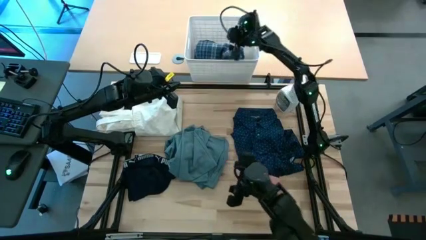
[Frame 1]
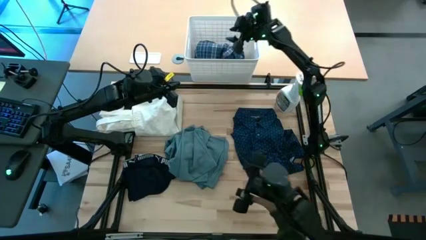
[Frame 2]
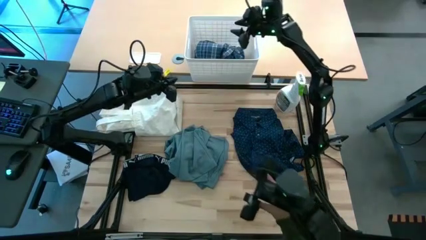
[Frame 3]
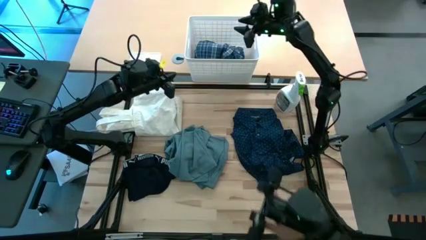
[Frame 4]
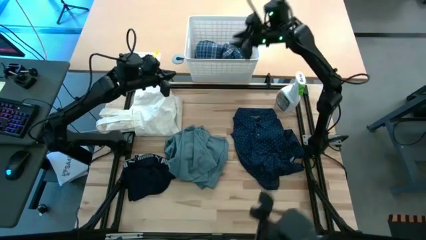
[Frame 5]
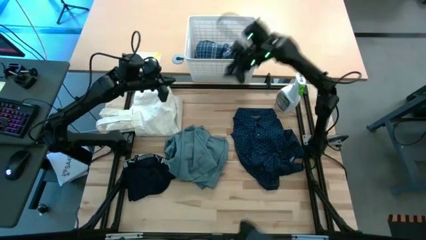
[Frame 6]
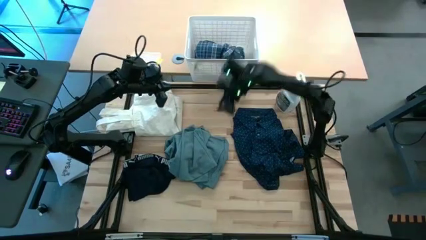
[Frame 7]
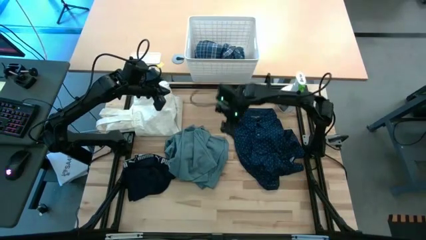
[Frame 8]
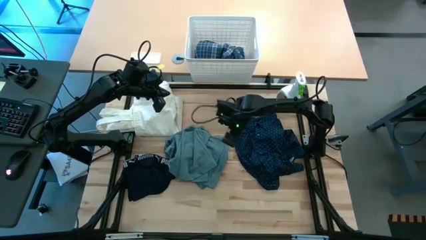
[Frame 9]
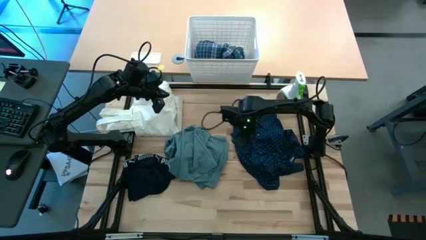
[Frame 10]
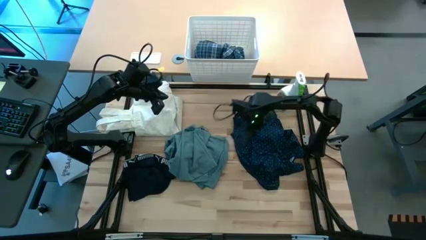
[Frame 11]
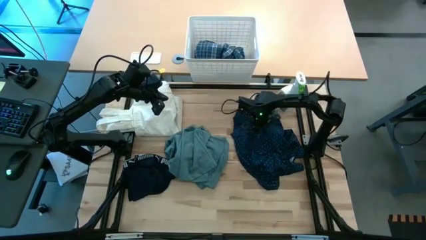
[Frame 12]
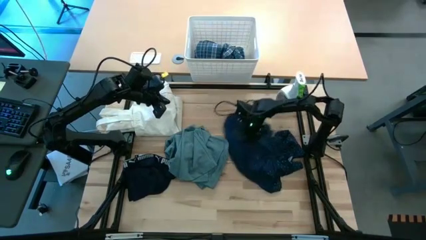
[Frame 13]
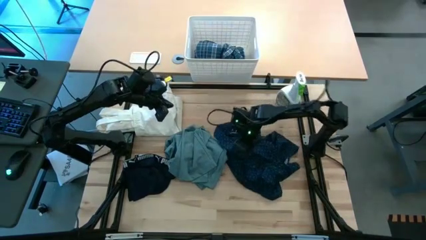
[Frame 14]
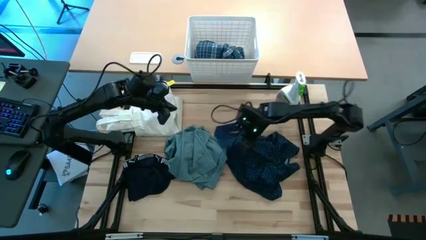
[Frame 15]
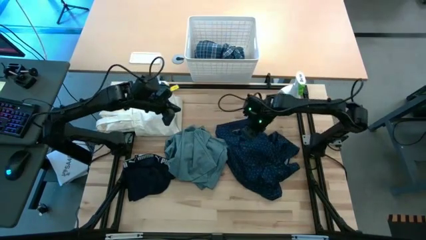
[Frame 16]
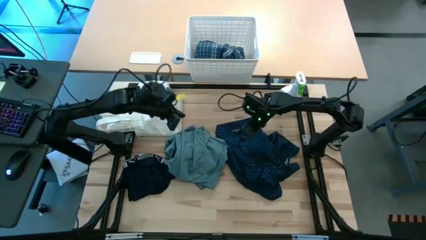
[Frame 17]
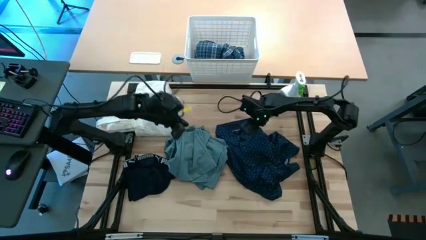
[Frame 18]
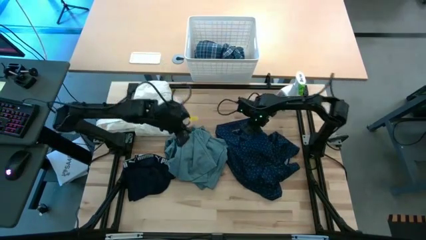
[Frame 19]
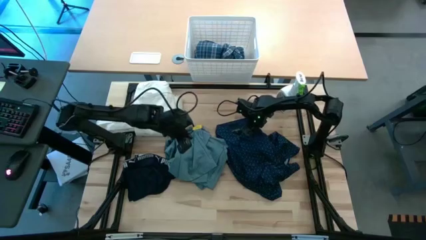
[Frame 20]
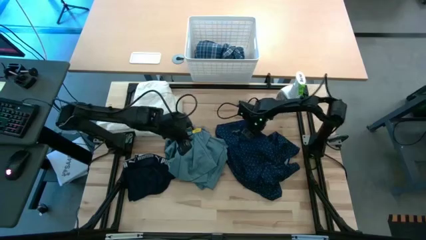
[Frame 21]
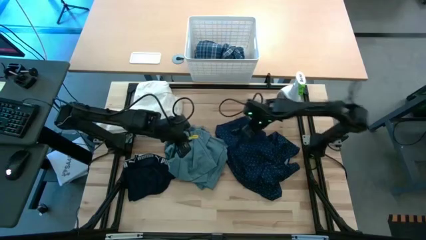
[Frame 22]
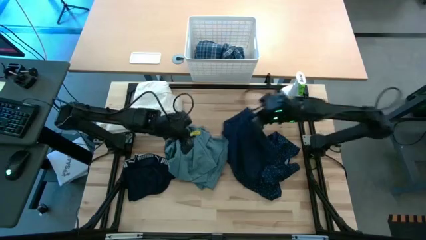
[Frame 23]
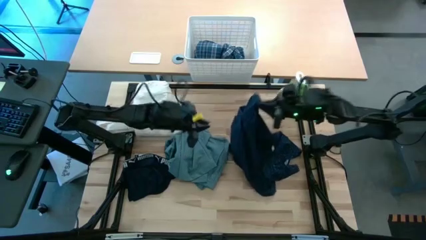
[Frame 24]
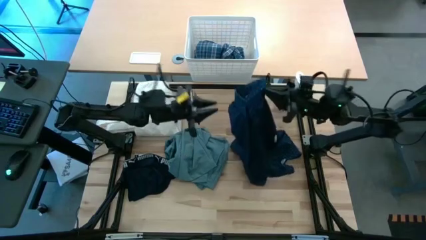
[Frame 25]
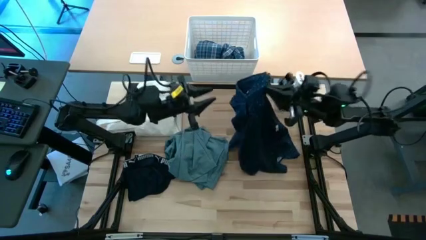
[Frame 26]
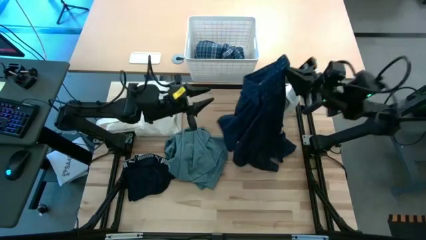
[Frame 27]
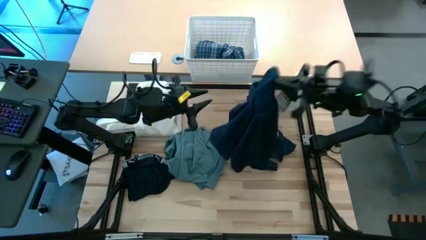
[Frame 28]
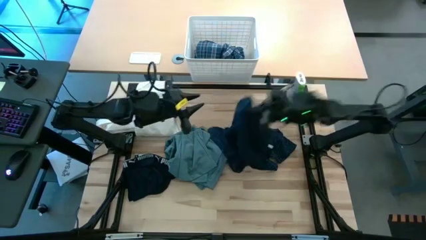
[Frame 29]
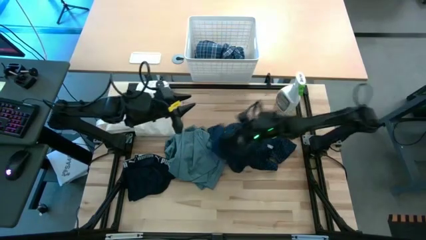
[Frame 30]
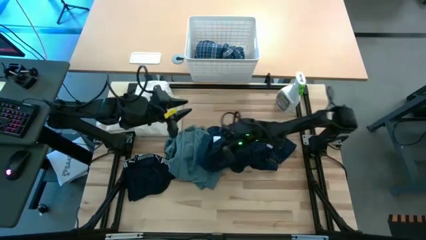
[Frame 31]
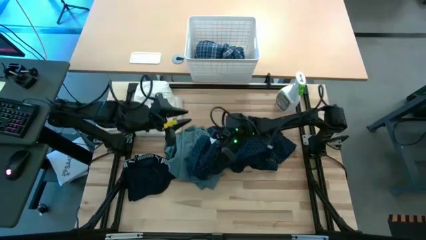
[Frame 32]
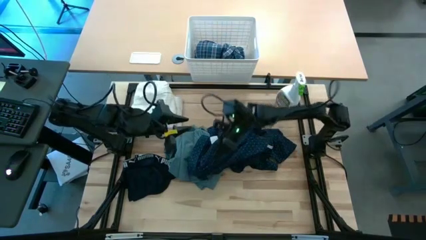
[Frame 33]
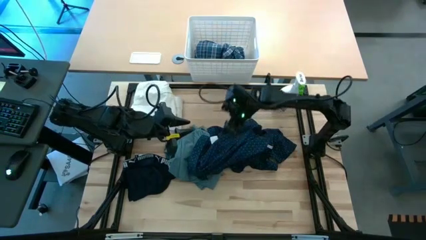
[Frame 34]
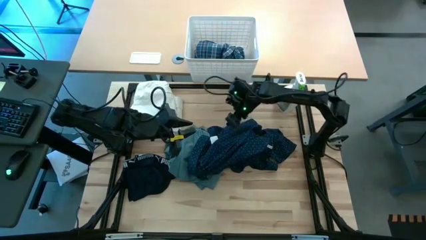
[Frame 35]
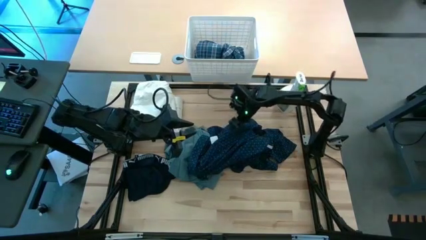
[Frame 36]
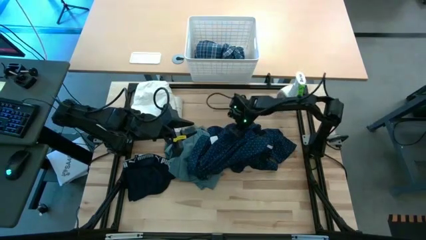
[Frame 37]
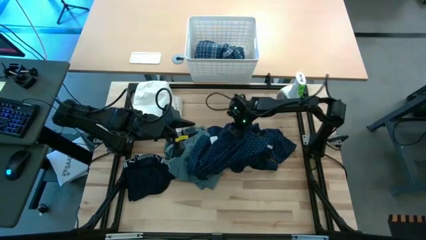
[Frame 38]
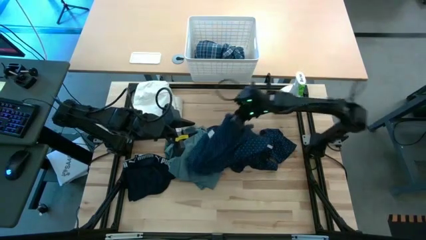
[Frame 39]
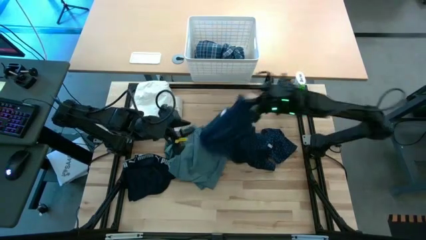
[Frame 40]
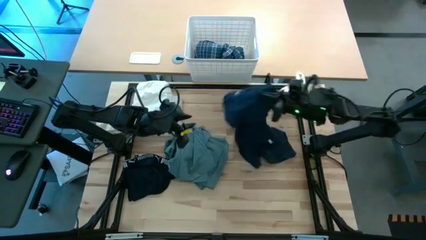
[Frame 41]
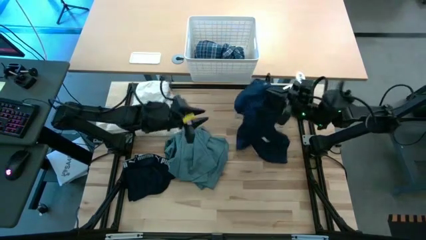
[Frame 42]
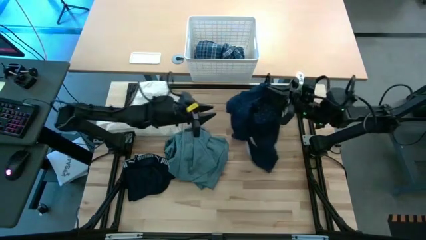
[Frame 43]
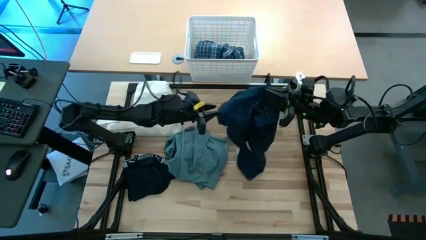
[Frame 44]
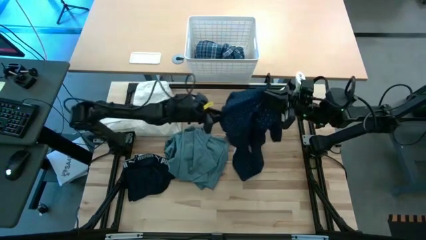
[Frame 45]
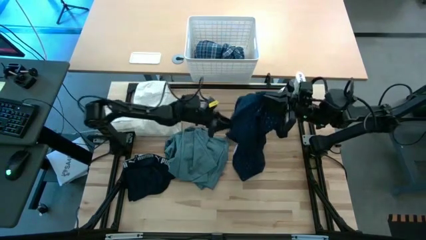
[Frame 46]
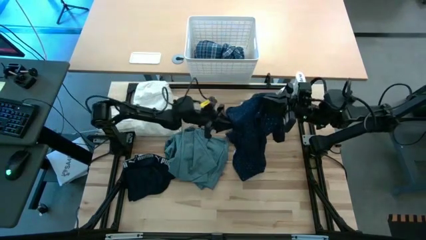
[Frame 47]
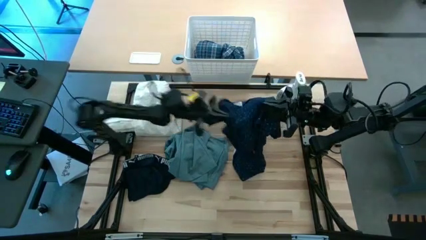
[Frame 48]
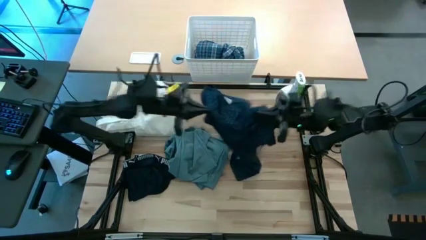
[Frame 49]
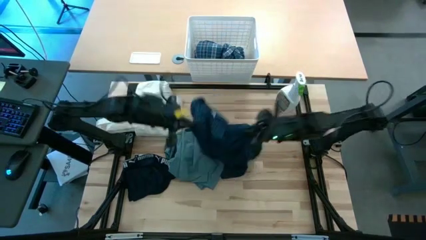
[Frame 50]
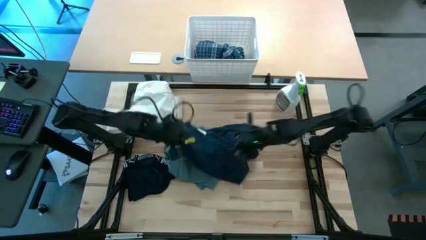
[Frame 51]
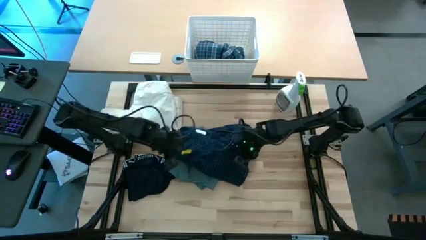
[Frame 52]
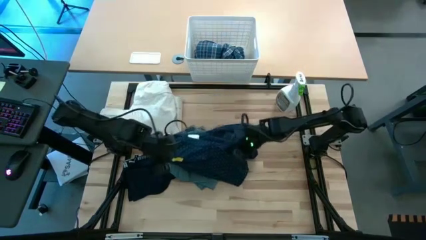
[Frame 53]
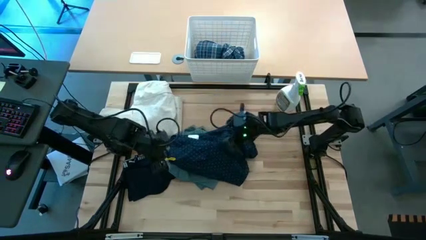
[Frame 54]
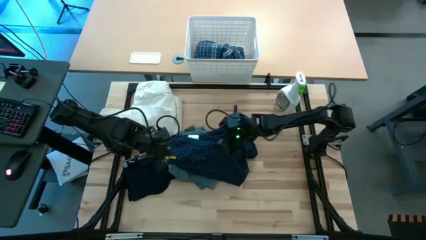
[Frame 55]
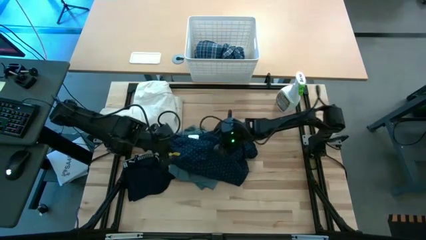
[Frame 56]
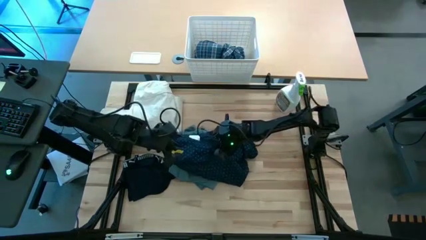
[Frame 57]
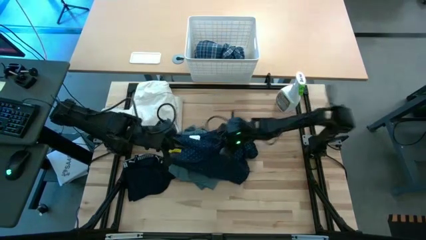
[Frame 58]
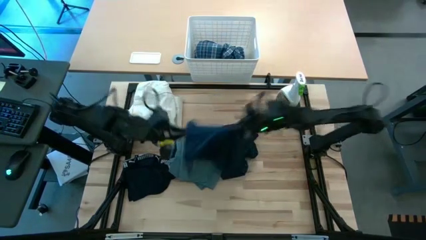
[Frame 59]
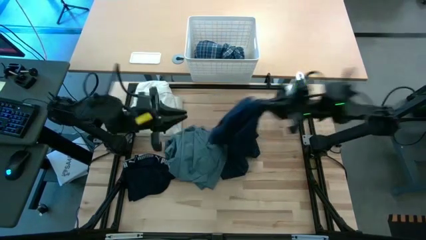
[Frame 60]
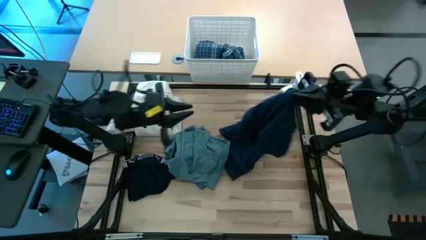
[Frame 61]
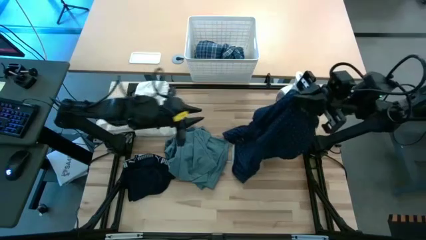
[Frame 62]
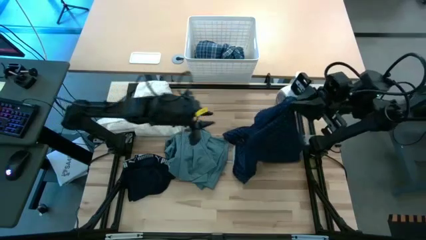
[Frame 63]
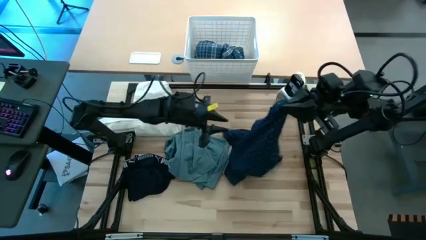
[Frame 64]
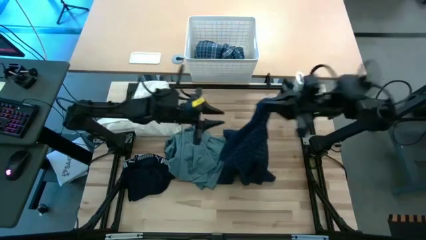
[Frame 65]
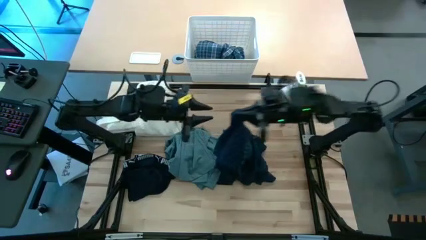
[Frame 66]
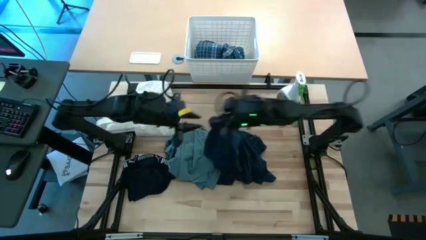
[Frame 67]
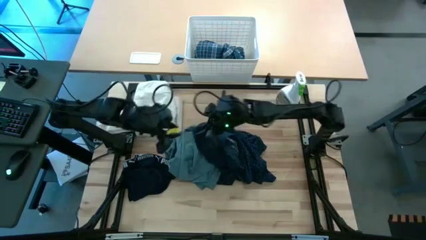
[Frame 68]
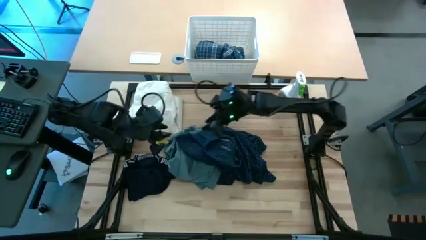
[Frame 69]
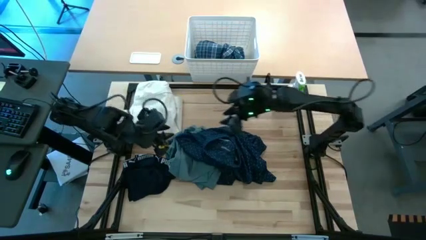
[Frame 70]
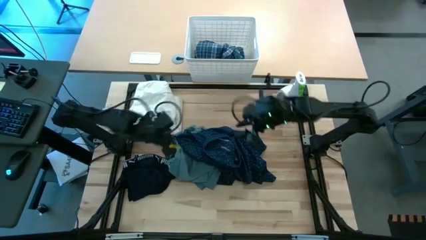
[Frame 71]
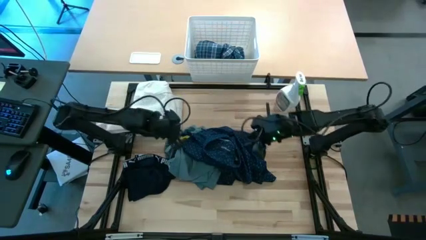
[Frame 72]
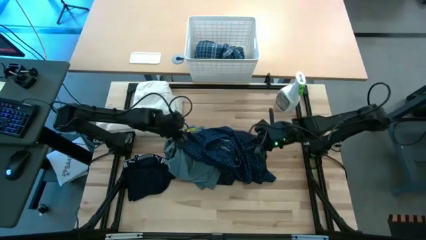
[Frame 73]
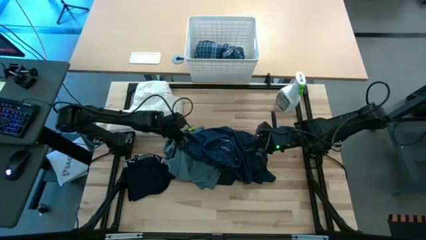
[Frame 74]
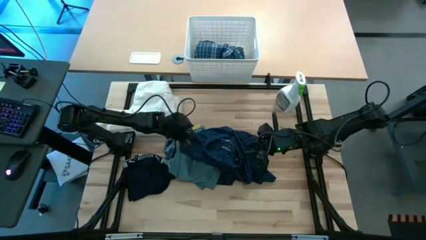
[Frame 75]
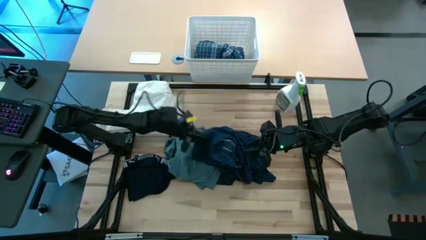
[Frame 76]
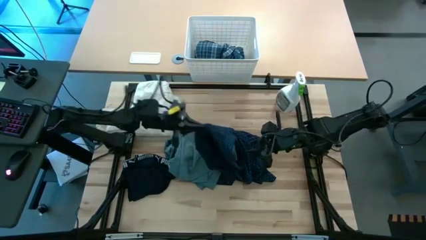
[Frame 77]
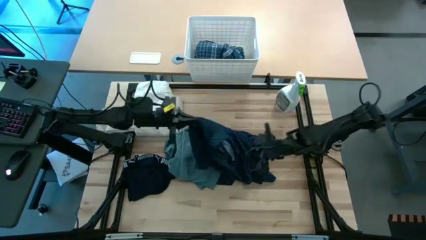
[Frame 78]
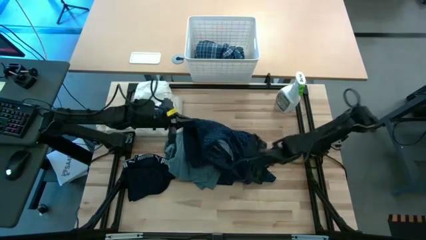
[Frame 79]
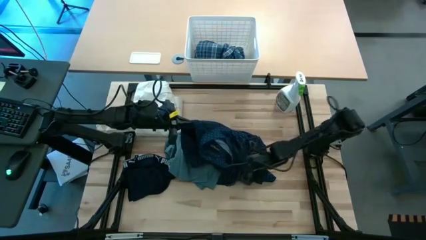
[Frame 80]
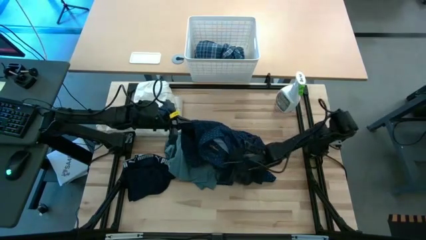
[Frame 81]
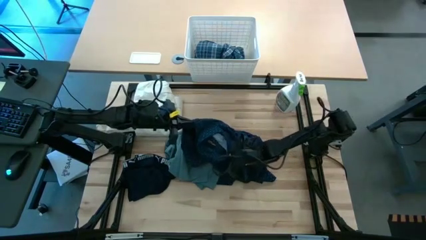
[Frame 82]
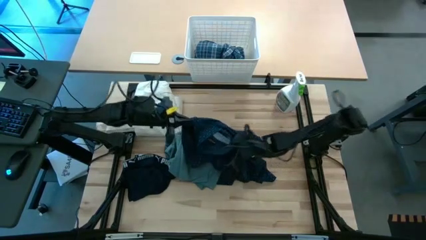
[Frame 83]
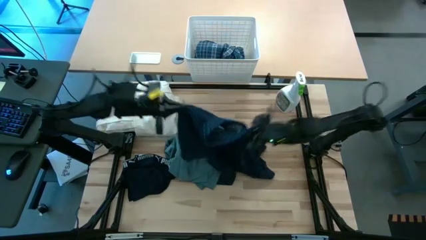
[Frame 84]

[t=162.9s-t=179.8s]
Fold the dark blue polo
